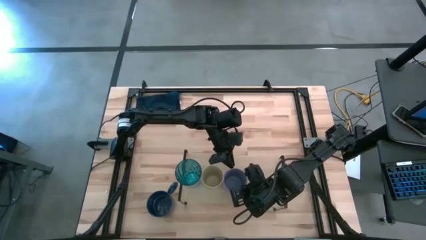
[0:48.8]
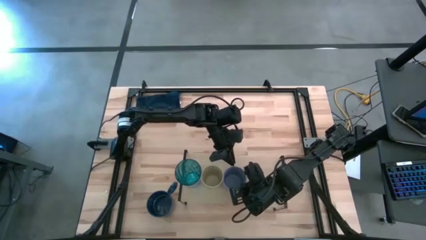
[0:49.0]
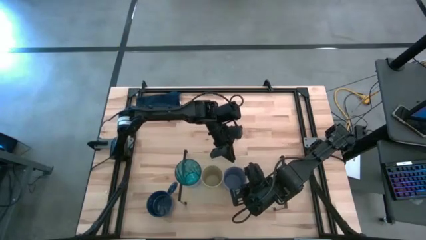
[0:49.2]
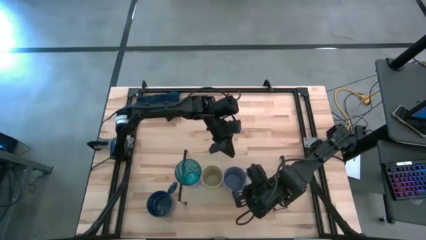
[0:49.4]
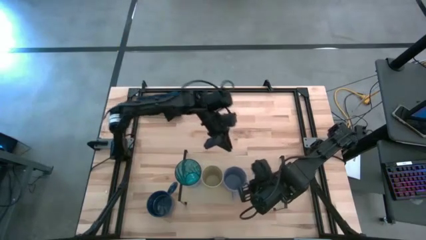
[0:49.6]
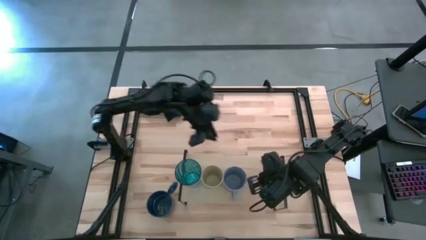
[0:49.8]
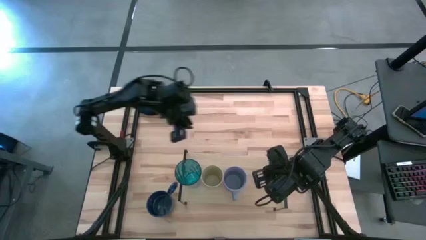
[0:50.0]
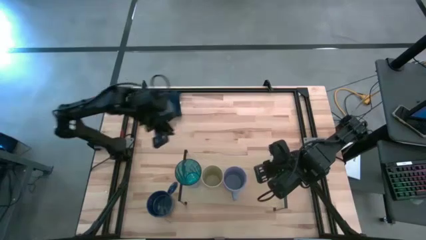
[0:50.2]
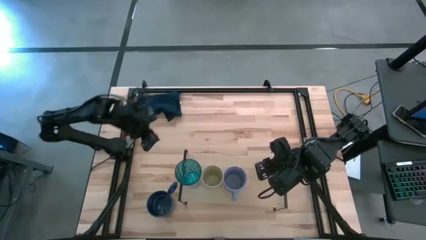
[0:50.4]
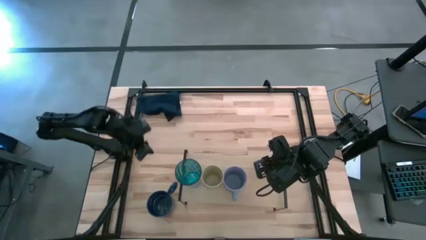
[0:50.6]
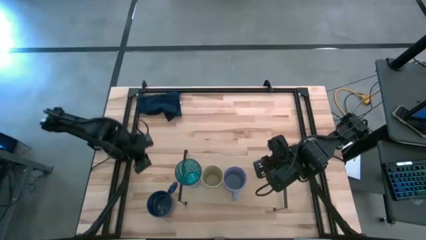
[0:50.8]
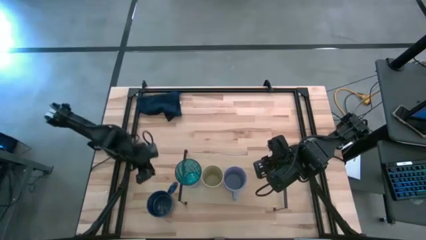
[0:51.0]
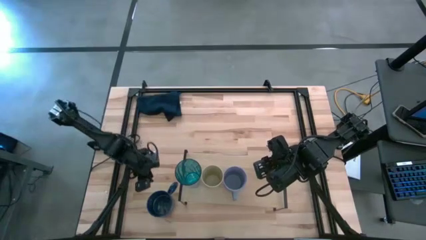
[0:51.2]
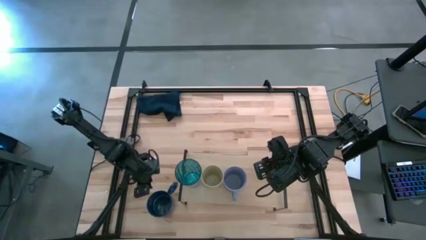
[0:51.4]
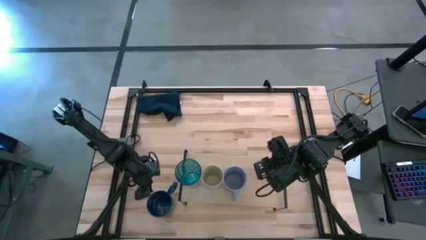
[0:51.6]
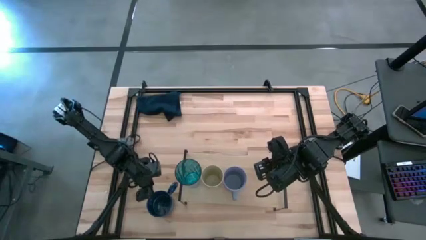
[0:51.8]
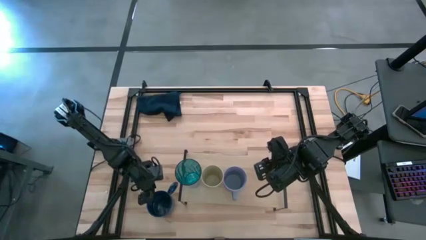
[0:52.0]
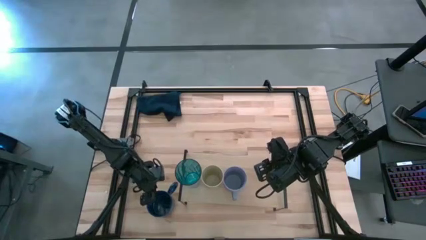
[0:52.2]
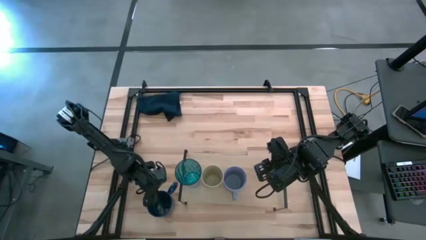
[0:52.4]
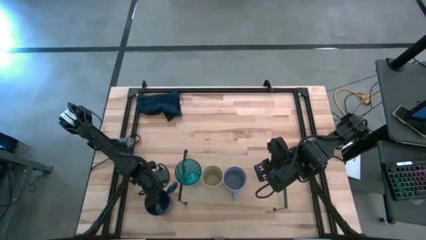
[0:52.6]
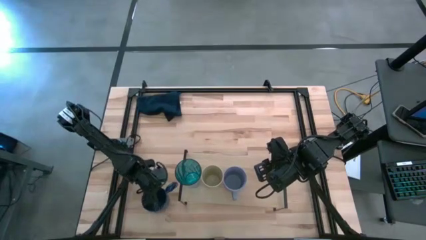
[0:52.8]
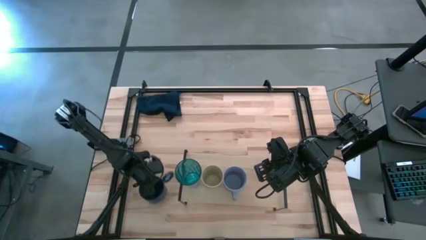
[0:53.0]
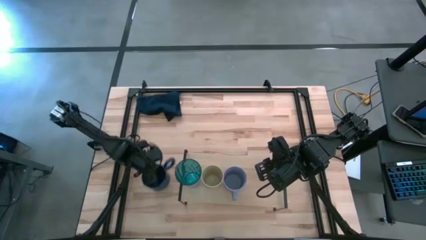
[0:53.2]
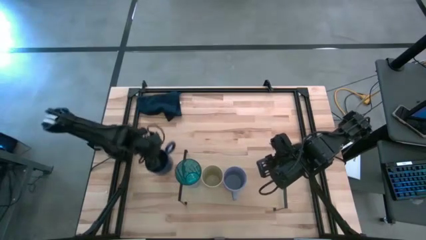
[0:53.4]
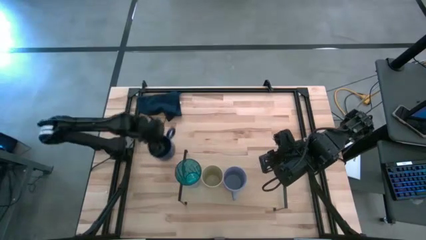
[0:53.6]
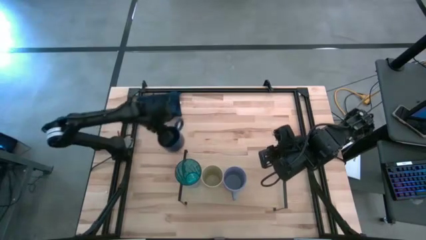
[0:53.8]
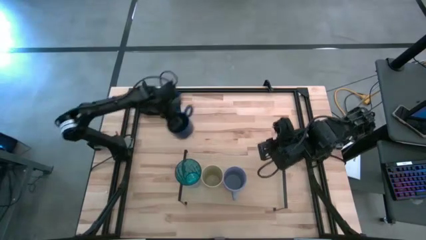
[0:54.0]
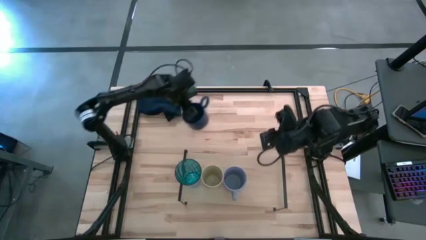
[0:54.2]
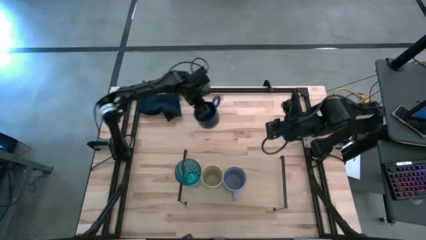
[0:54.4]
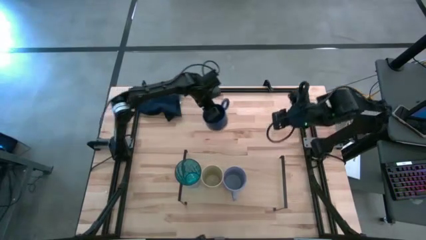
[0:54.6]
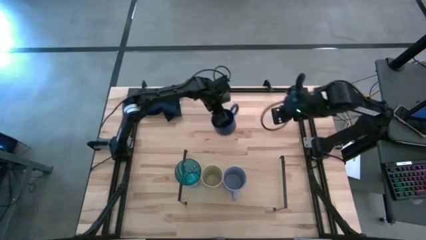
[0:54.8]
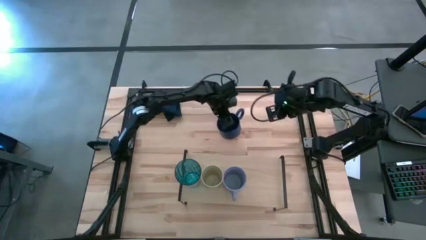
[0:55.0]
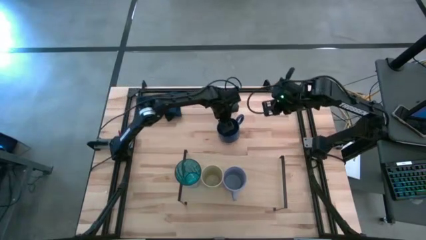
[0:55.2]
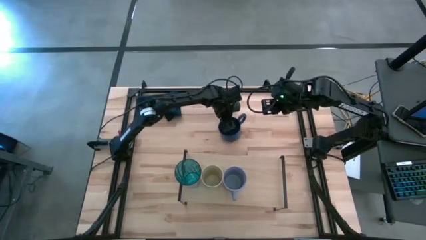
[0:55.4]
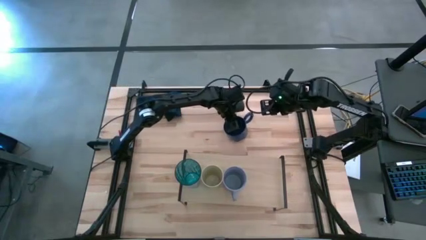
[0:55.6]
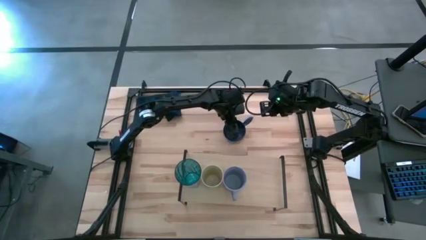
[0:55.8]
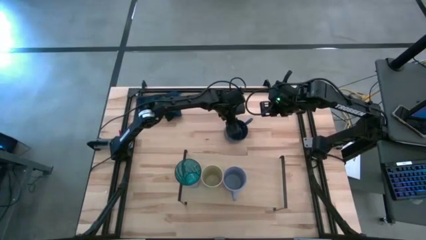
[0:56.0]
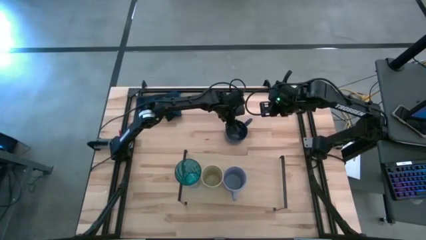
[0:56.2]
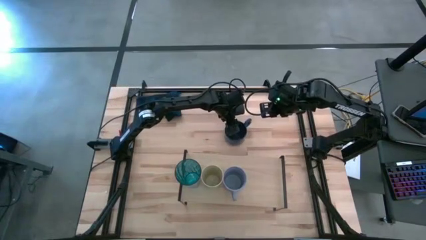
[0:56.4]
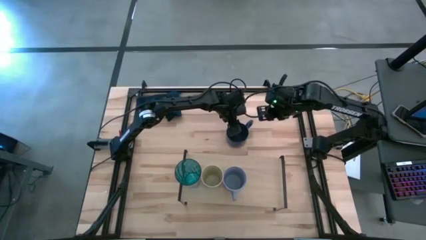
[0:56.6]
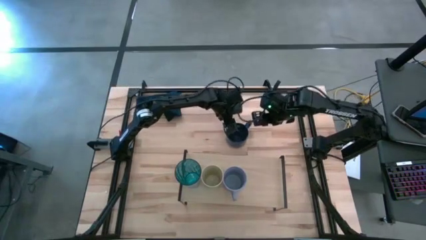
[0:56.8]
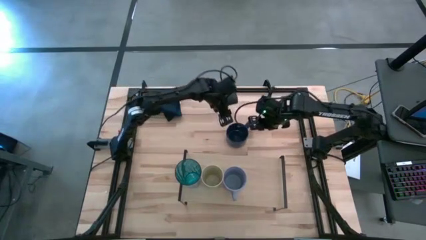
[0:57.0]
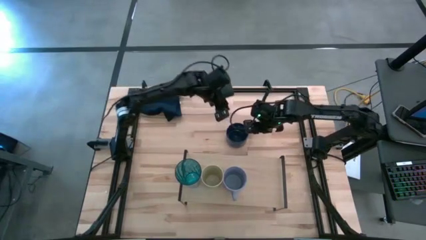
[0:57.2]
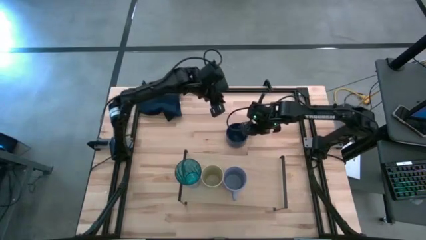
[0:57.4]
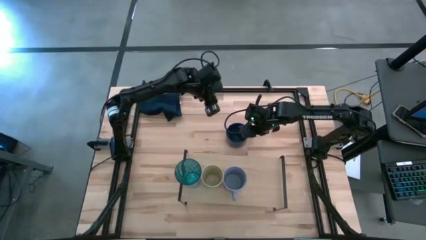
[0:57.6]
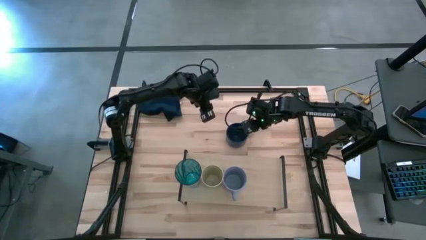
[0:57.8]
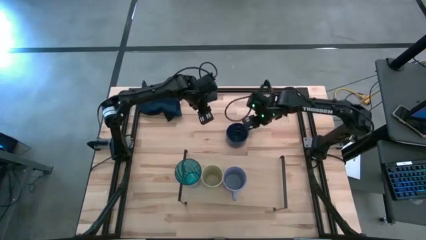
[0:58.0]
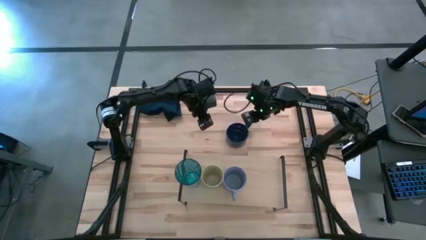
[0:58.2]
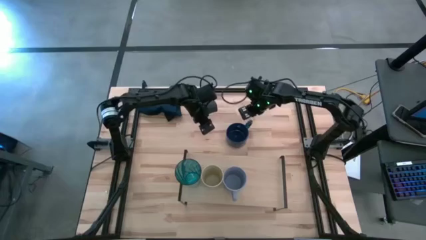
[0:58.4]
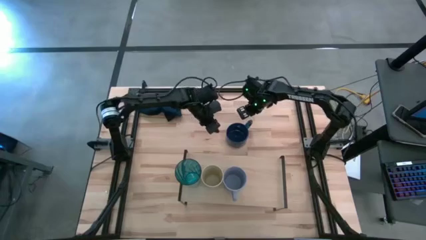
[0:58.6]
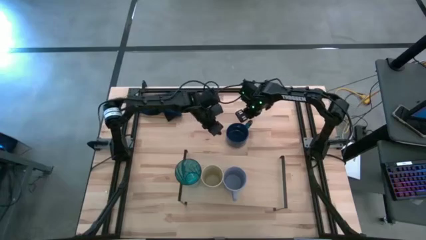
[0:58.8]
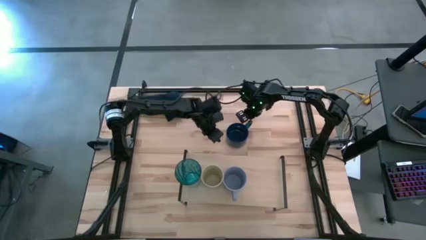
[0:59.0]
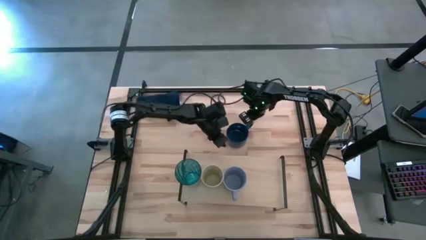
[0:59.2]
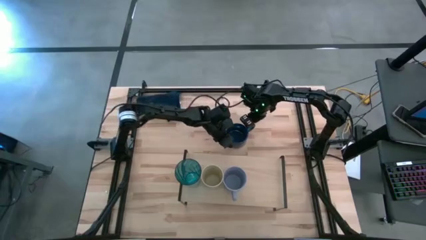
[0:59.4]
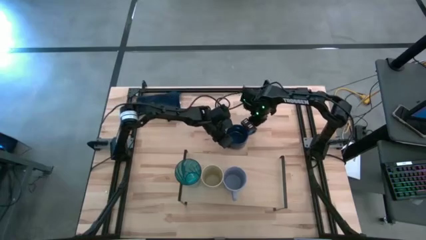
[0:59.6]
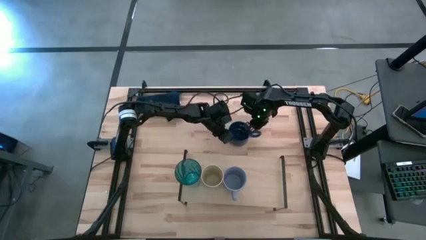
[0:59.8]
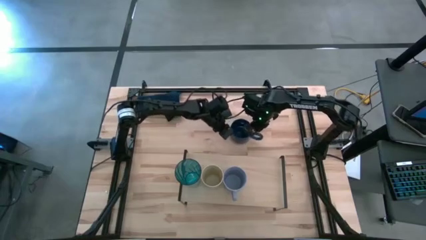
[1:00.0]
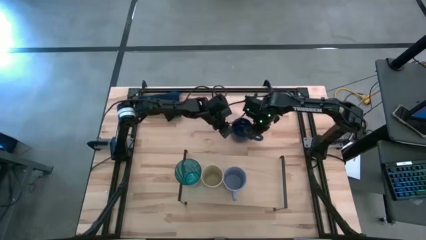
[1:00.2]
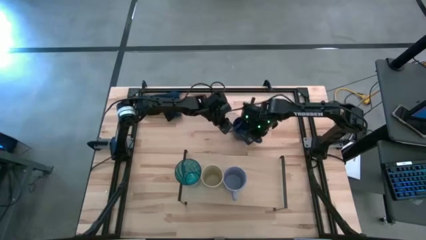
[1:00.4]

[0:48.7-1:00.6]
Task: Stack small to large cups/mugs on shelf
Put the blue mug on the shelf

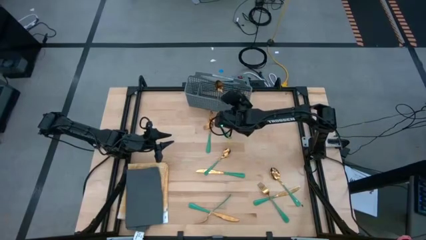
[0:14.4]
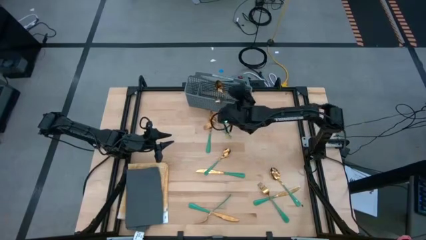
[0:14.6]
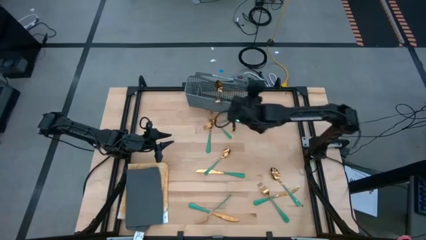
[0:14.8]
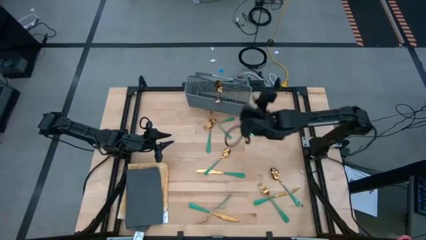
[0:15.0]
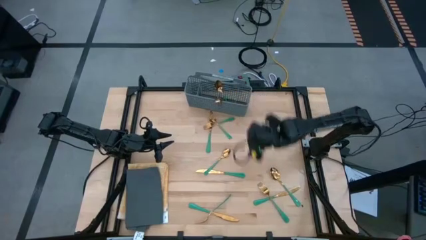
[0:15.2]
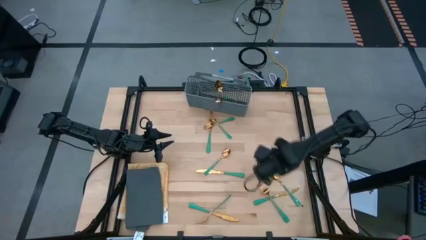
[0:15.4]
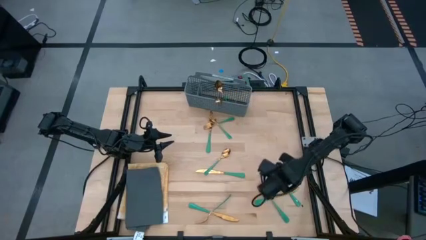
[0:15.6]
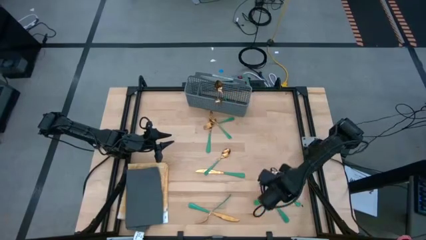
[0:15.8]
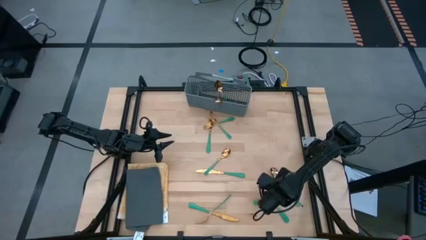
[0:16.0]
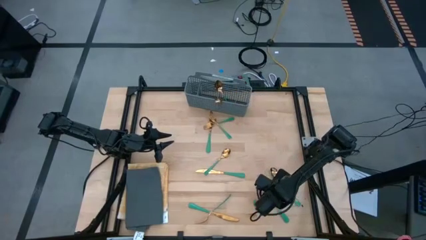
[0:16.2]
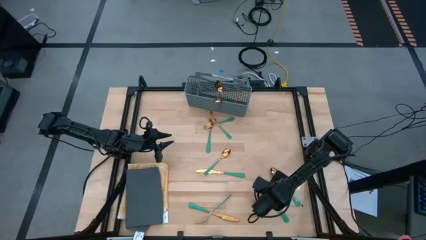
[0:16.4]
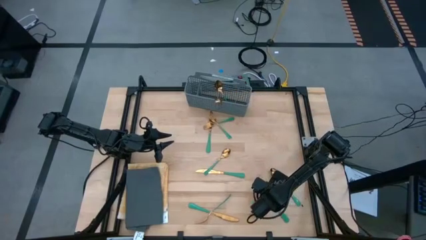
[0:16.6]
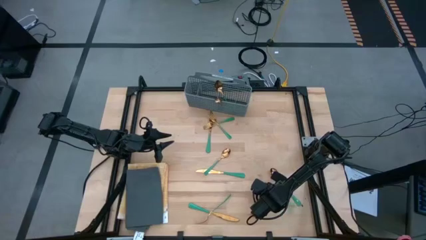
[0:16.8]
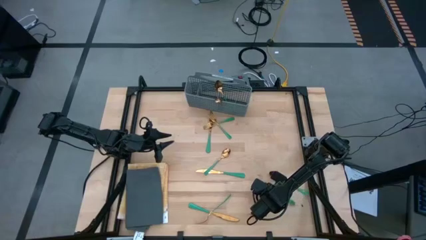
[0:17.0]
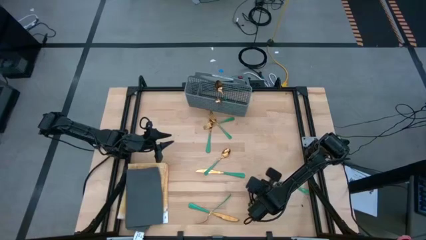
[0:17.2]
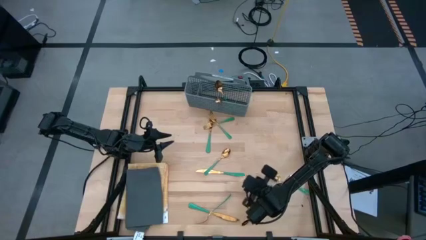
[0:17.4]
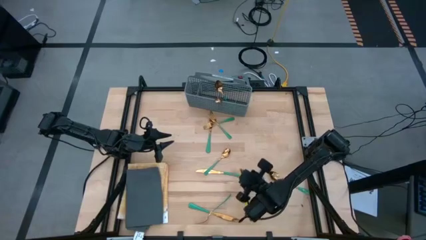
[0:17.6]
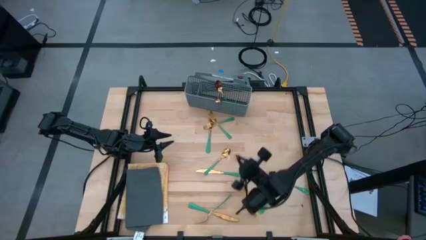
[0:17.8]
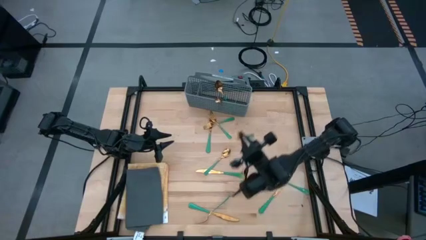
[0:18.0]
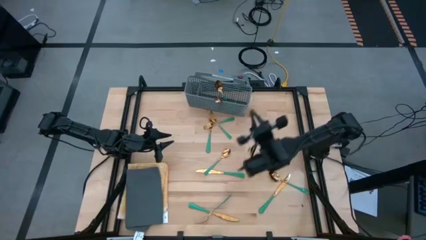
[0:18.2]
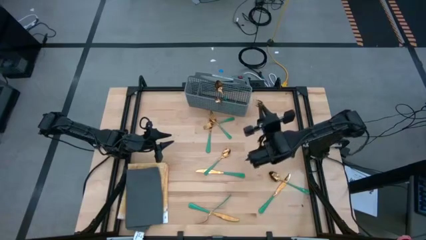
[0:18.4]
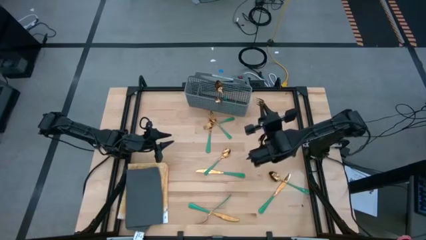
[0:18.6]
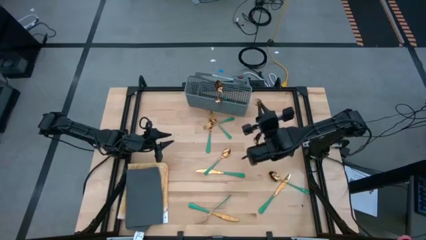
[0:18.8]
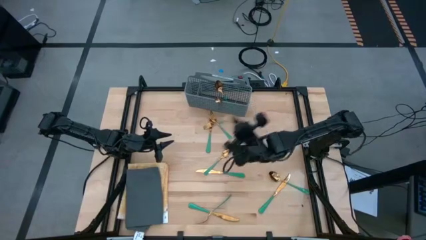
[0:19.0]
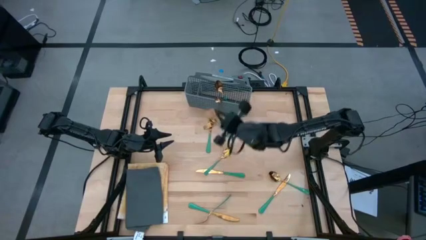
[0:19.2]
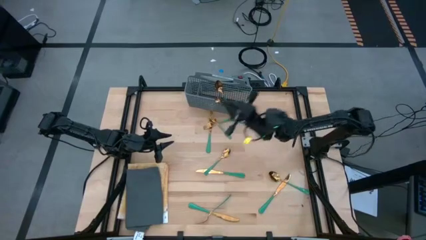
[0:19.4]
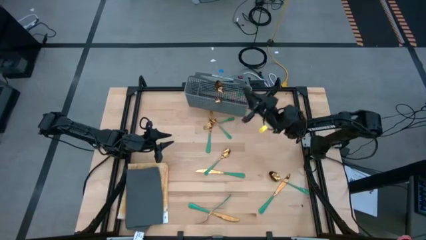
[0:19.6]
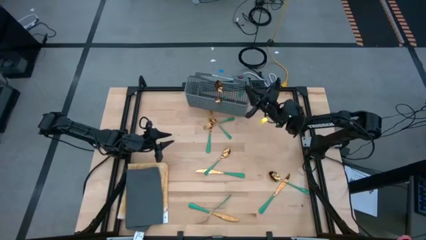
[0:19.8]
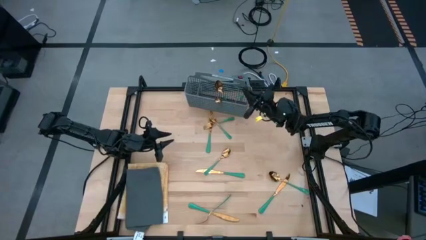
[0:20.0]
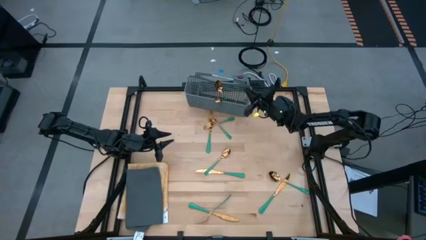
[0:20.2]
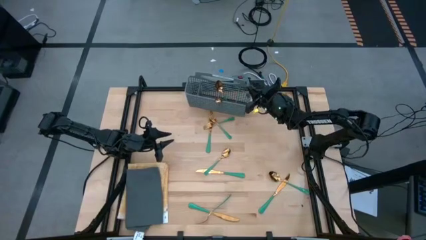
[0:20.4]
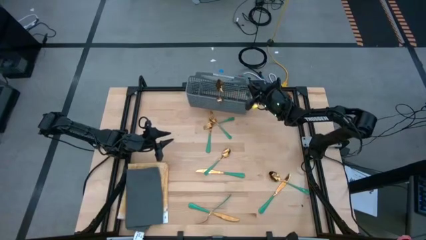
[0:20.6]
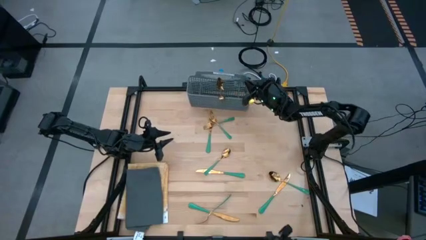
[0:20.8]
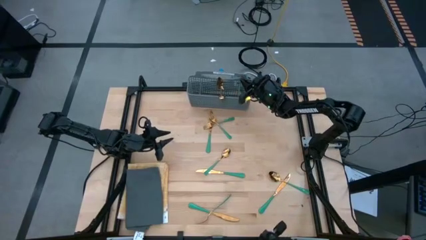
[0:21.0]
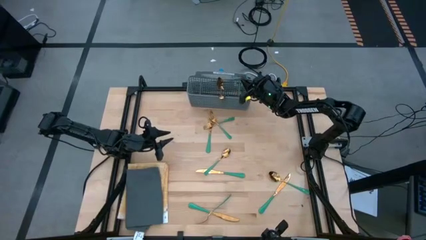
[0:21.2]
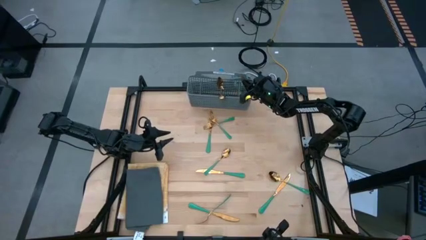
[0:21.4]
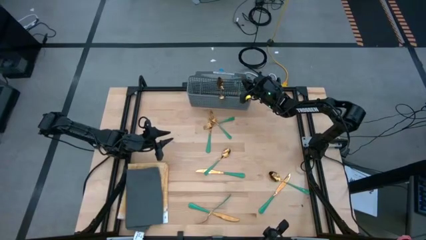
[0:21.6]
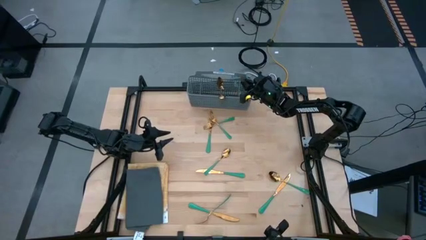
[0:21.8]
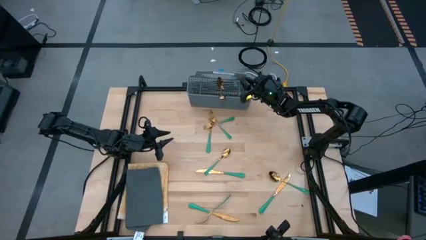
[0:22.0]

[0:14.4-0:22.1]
Task: Sort silverware
Put the green fork into the gray silverware holder
